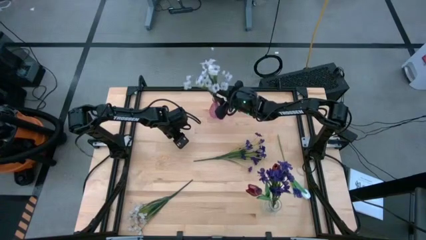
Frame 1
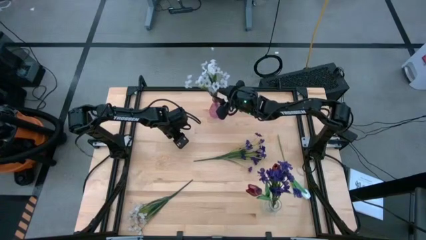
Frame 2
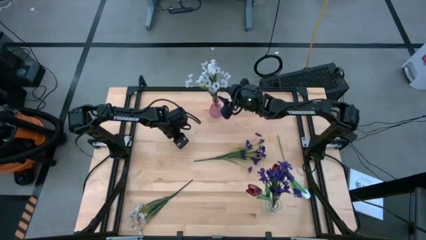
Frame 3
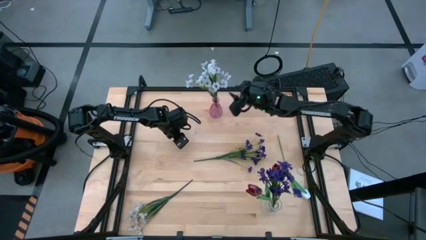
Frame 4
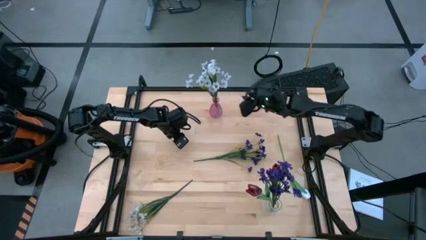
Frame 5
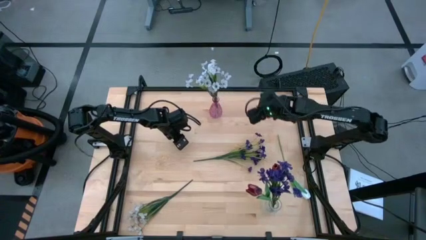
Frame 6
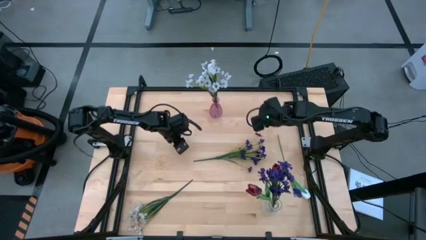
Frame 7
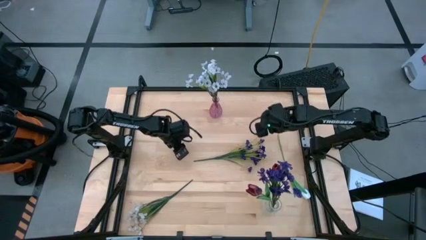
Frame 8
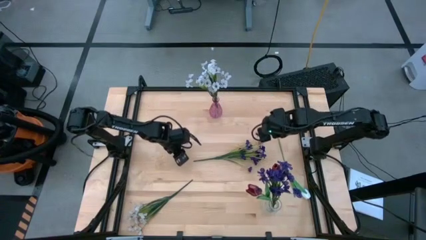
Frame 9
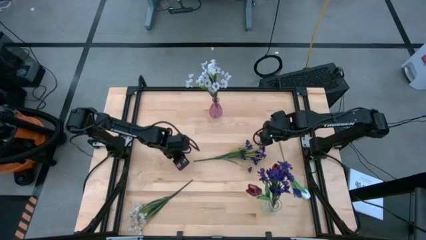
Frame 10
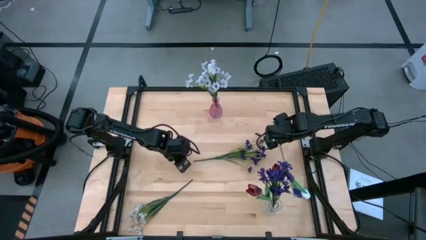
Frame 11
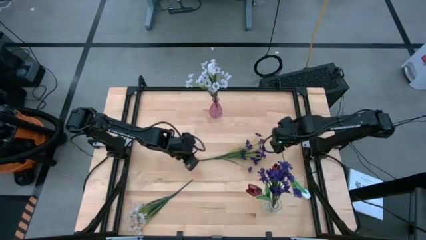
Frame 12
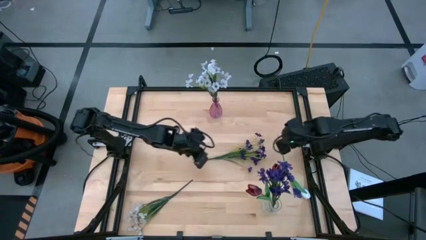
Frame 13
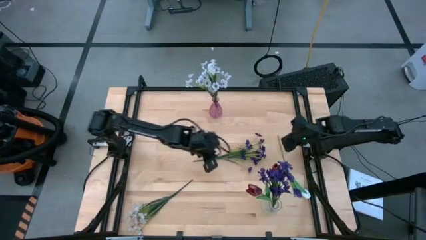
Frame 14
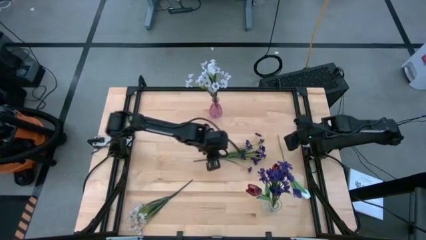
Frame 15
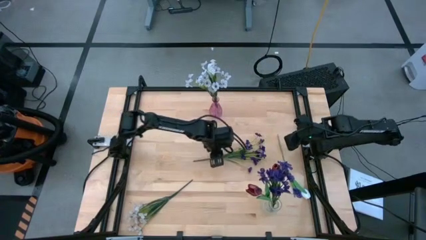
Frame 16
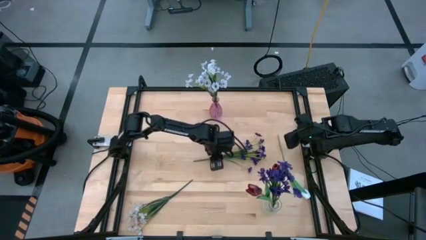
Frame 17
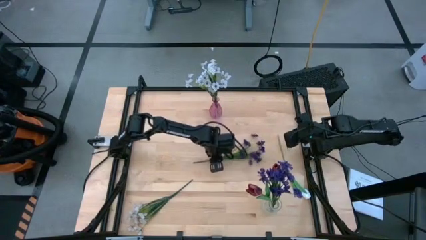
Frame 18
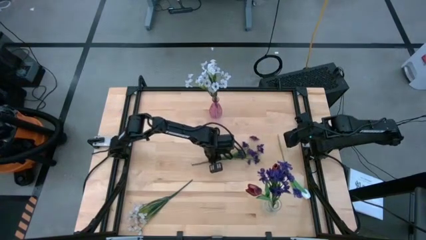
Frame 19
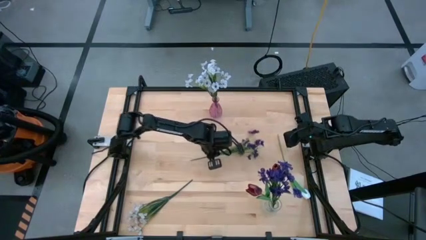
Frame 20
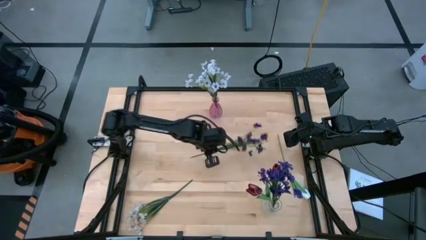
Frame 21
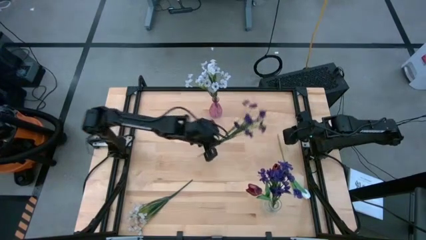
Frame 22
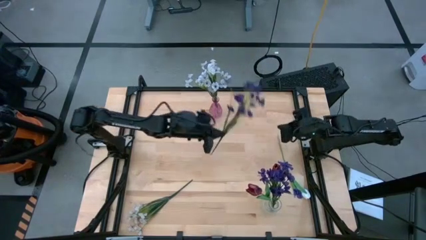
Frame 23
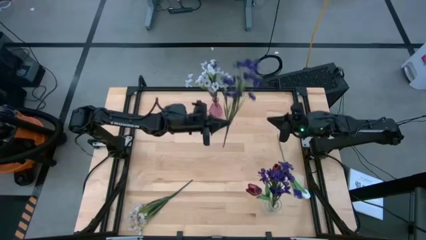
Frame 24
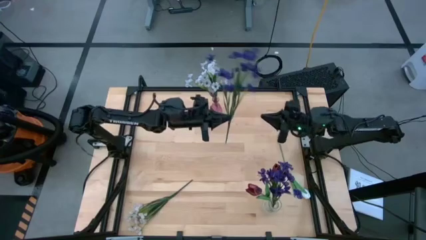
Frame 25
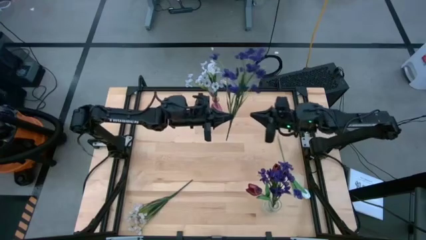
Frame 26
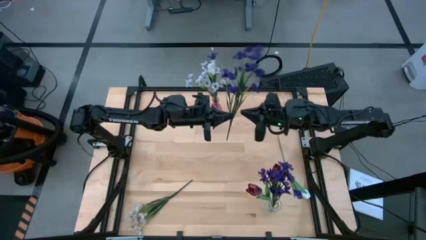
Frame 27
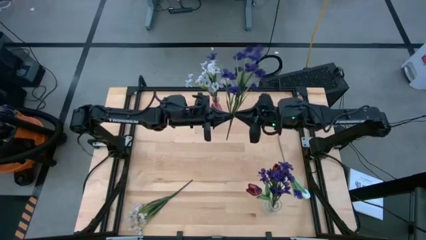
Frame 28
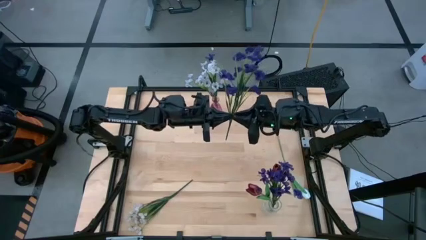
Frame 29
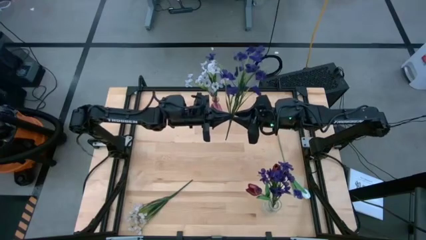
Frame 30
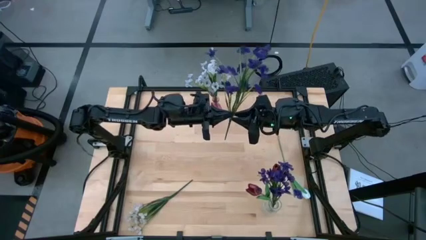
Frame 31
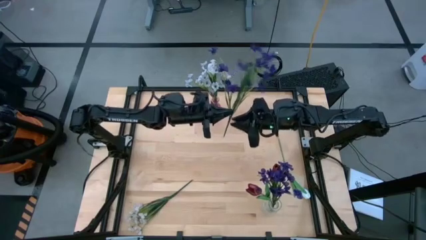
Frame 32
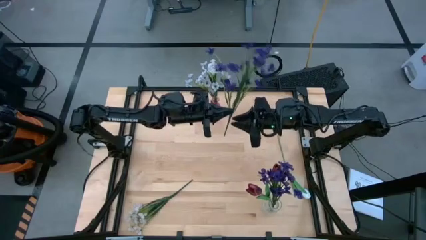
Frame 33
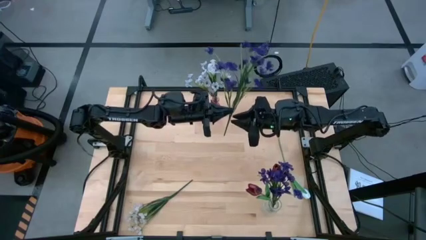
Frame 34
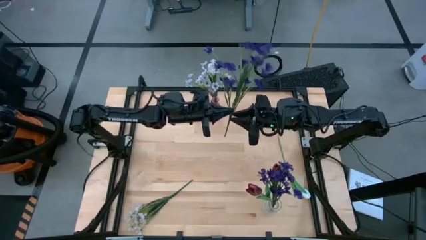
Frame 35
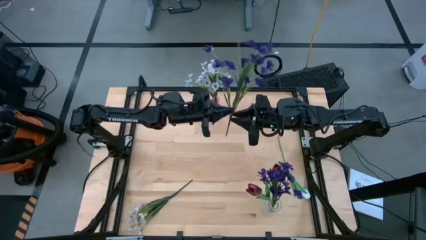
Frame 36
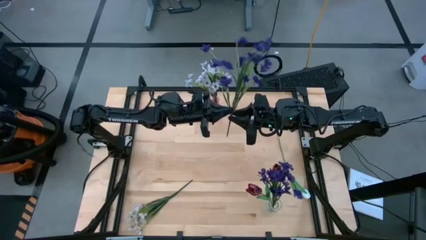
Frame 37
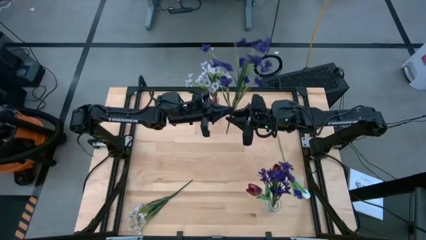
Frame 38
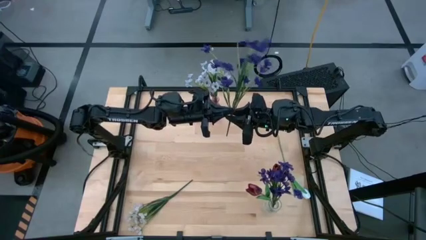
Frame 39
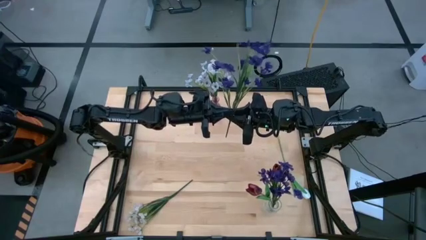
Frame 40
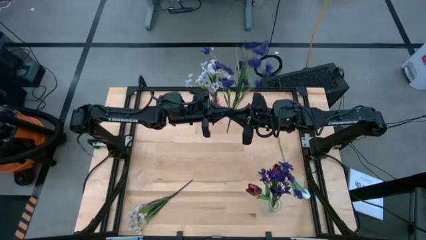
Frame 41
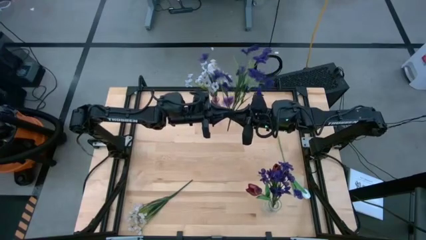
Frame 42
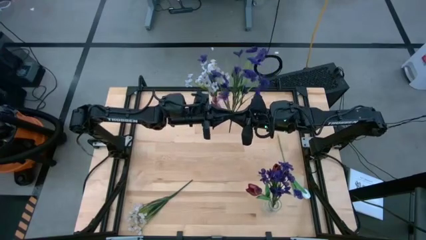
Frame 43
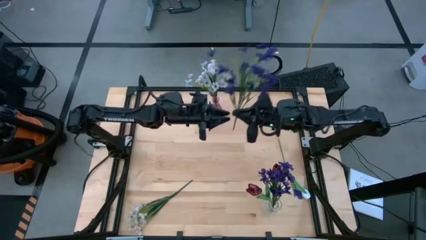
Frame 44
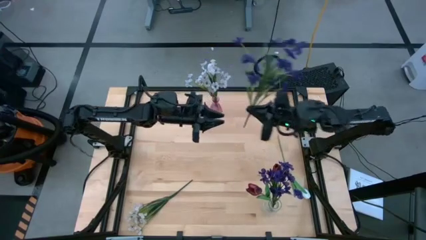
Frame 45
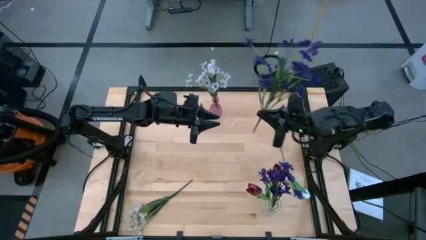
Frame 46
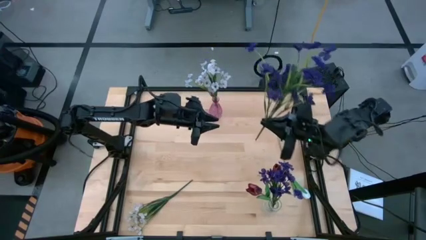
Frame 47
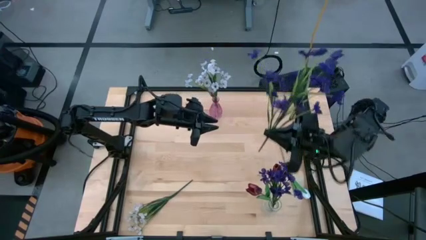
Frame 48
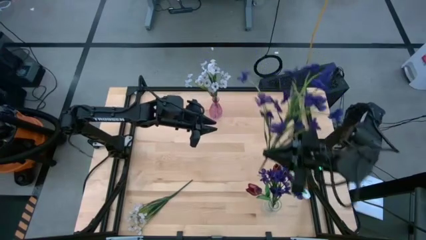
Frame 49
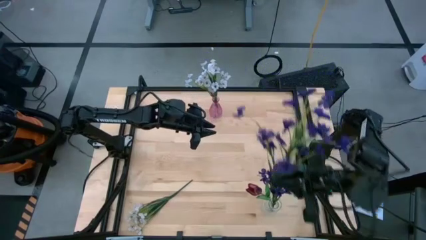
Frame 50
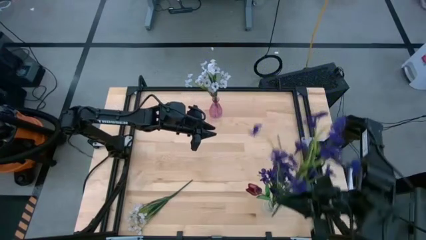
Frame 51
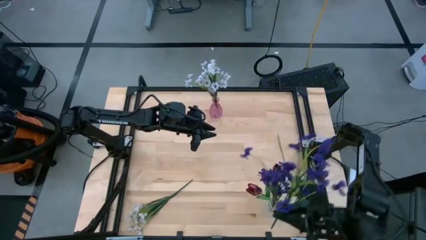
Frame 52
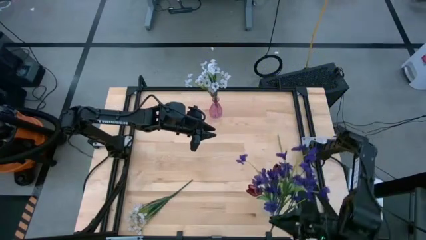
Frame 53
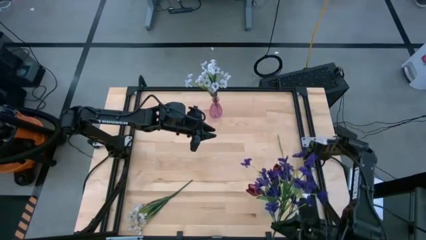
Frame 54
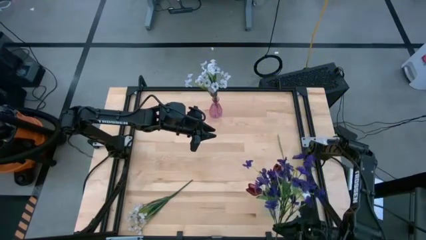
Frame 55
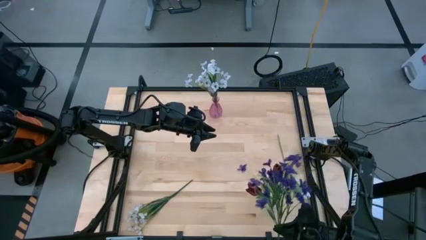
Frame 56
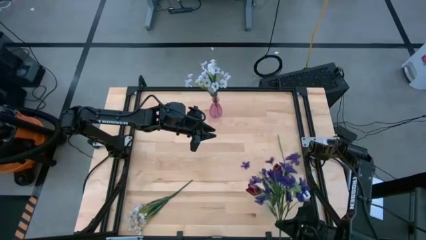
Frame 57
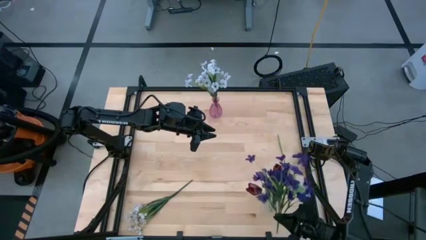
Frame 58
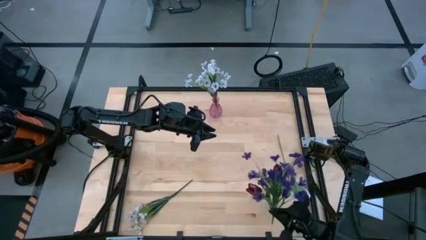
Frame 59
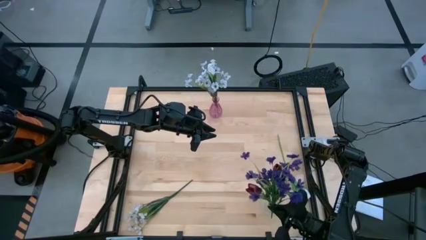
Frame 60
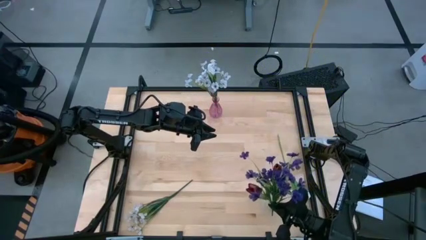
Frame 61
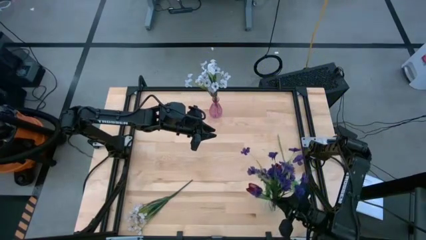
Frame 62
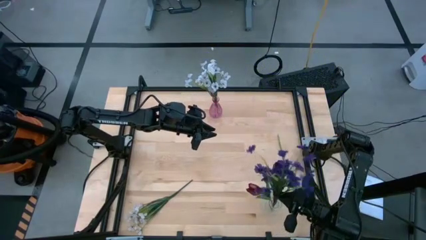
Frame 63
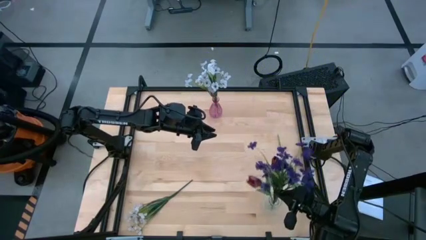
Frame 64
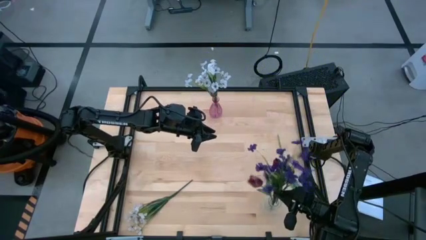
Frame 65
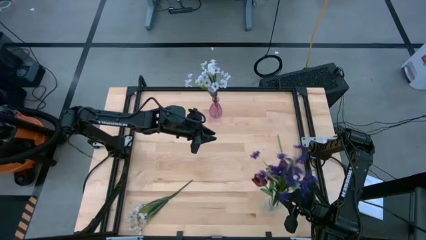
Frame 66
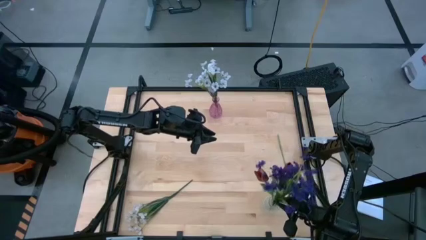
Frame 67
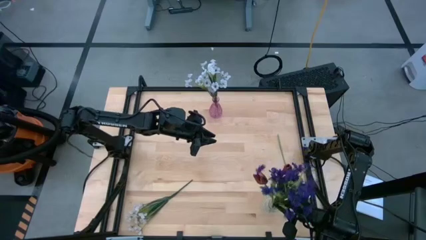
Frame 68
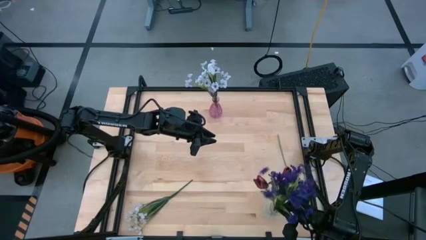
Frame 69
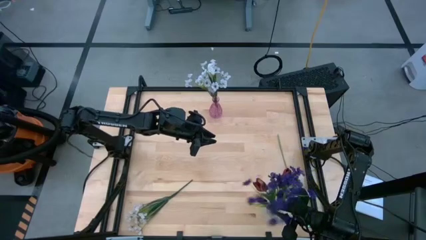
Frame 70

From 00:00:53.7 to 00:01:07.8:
Task: Sort flowers into vase by color
Put the purple flowers into the transparent vase

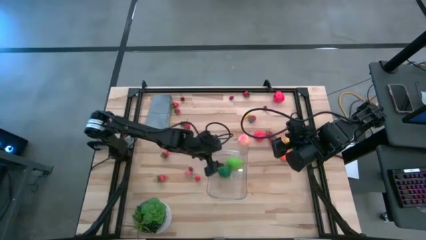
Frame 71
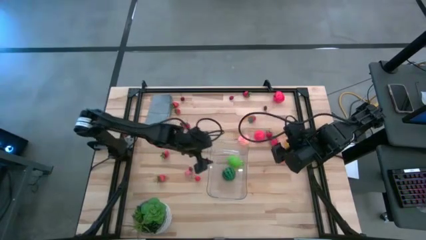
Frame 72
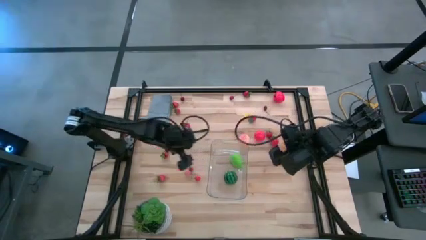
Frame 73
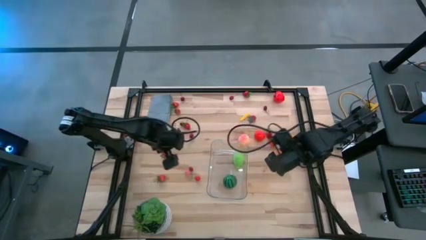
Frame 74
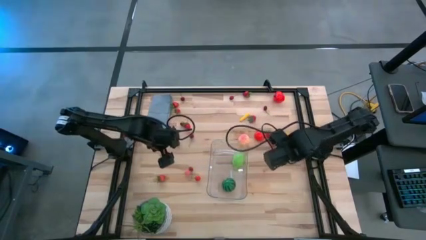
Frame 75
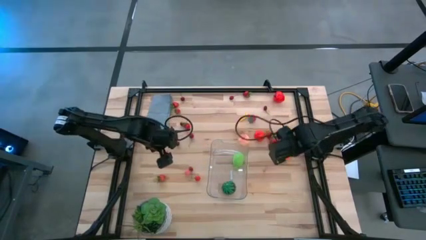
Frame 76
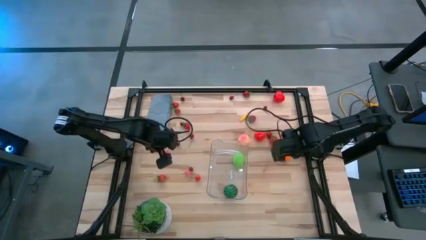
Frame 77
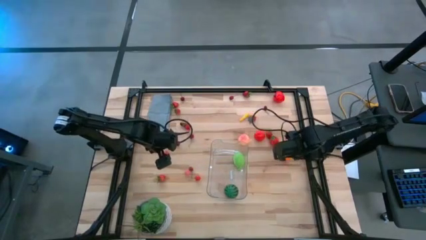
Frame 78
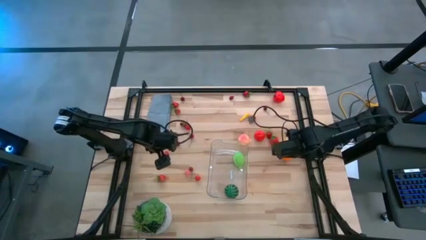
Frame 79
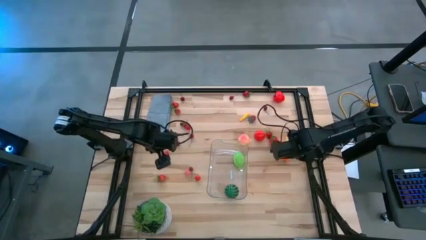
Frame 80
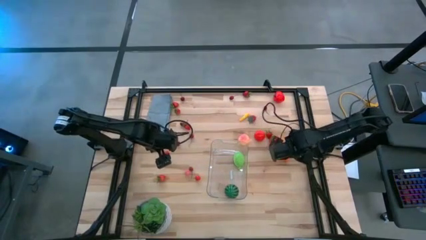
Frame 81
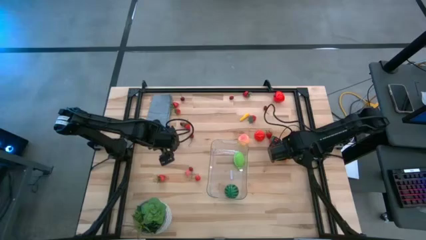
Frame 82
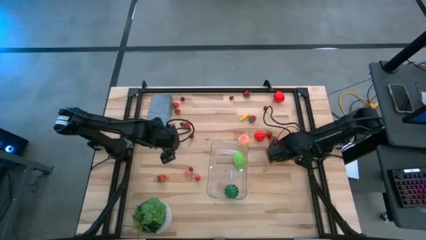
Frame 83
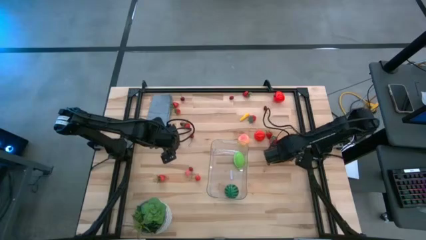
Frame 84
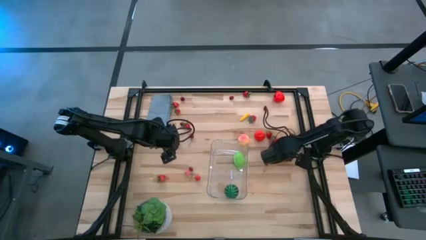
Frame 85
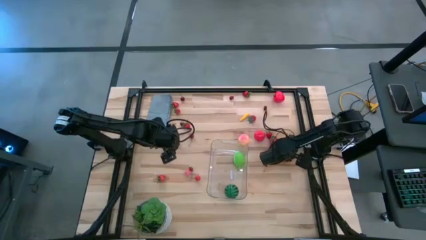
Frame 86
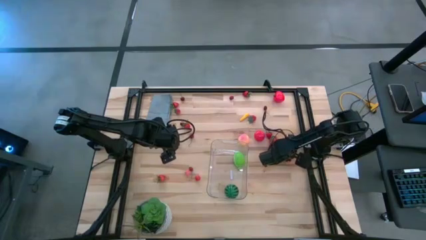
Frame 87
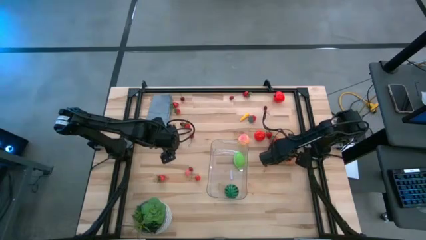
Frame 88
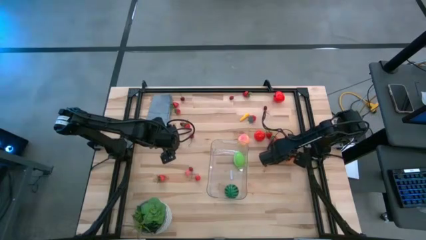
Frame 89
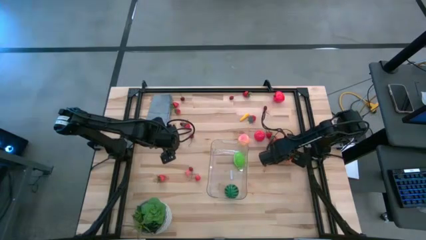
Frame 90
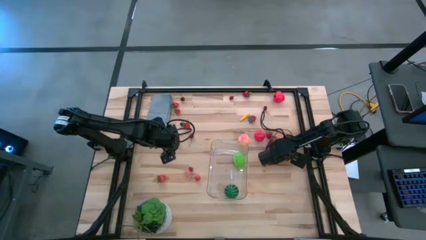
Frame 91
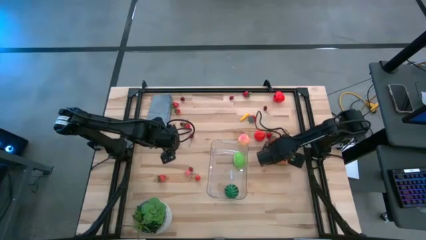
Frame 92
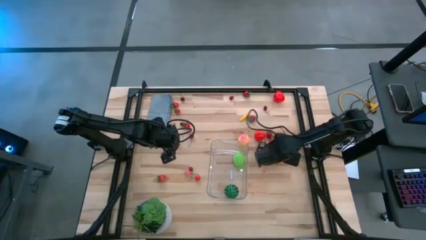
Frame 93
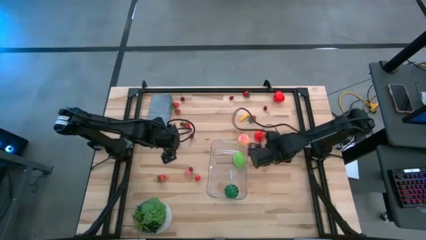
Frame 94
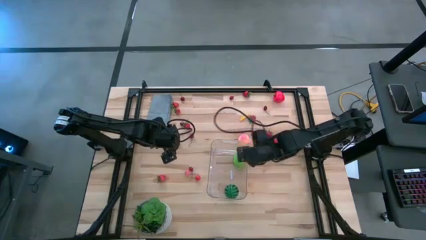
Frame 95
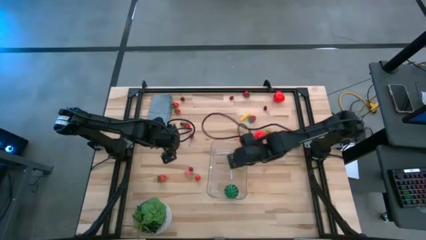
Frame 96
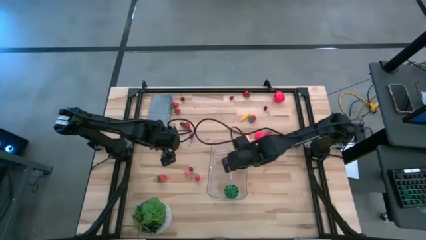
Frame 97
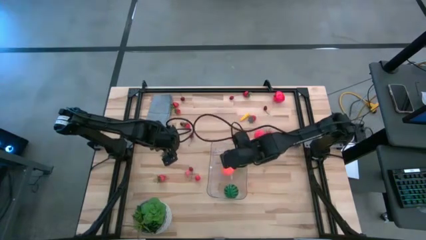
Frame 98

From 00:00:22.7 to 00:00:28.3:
Task: Pick and placing Produce into tupperware
Put the pumpkin into the transparent bin
